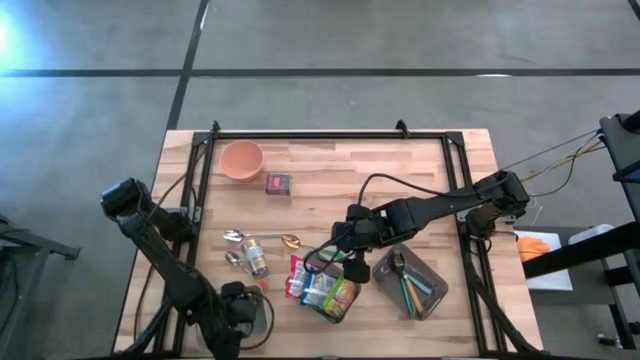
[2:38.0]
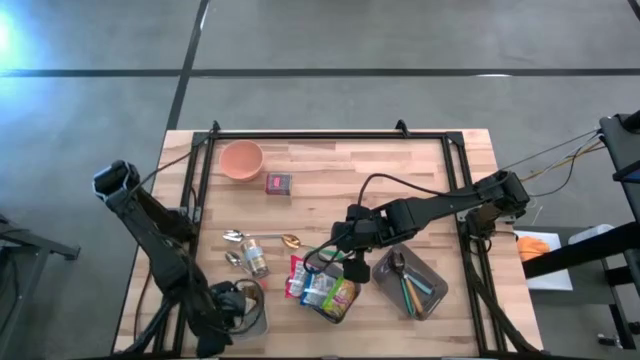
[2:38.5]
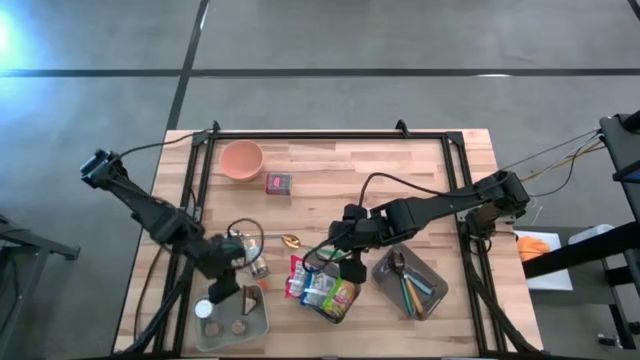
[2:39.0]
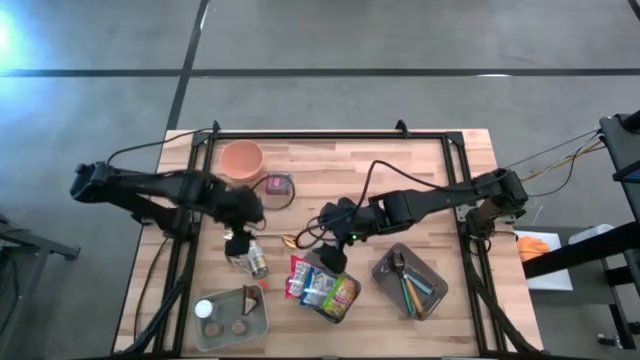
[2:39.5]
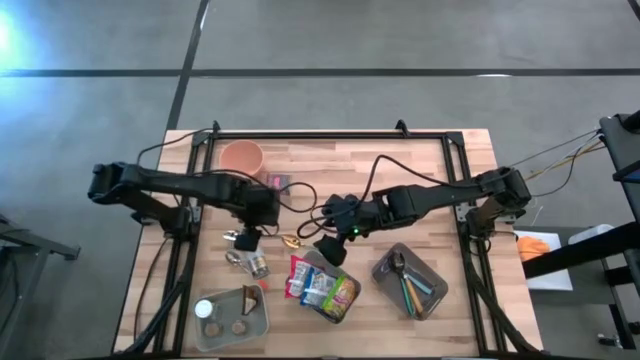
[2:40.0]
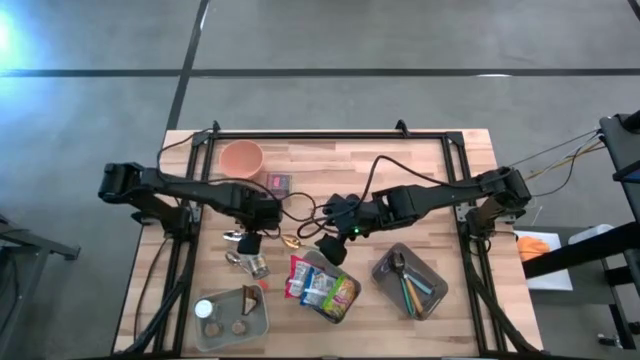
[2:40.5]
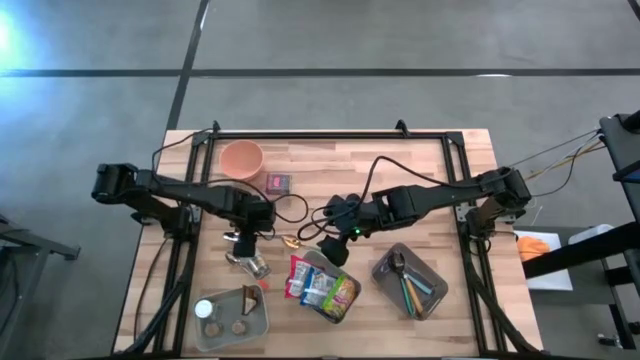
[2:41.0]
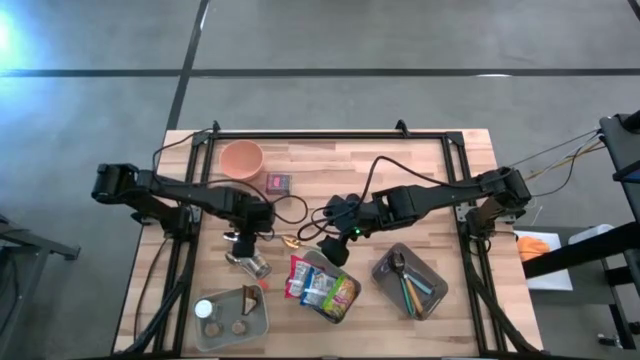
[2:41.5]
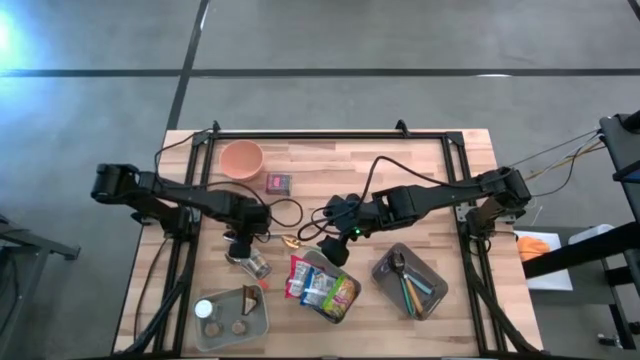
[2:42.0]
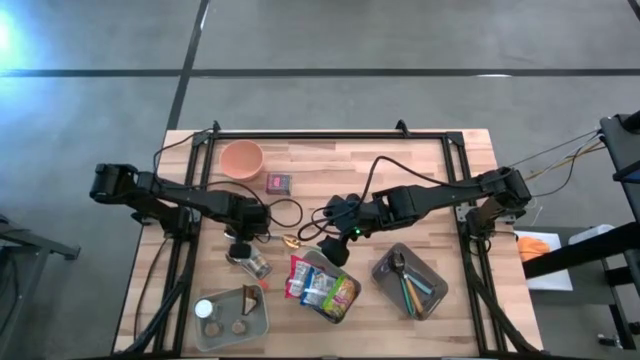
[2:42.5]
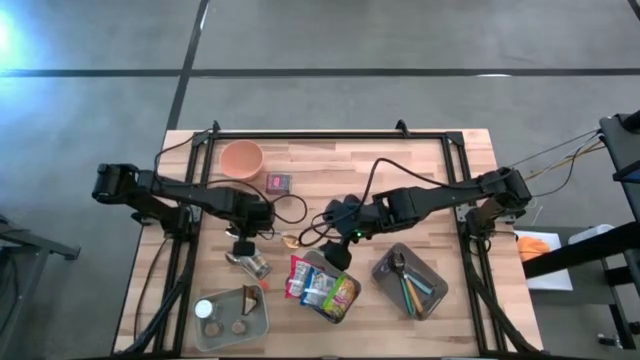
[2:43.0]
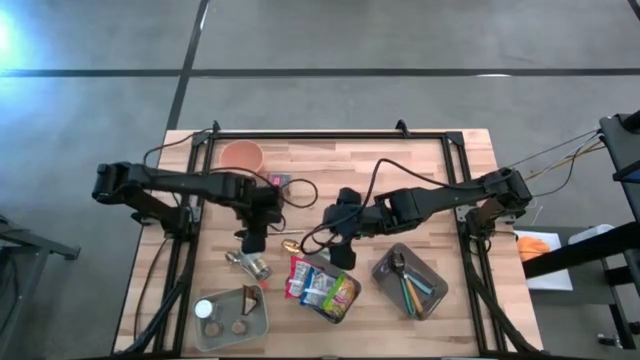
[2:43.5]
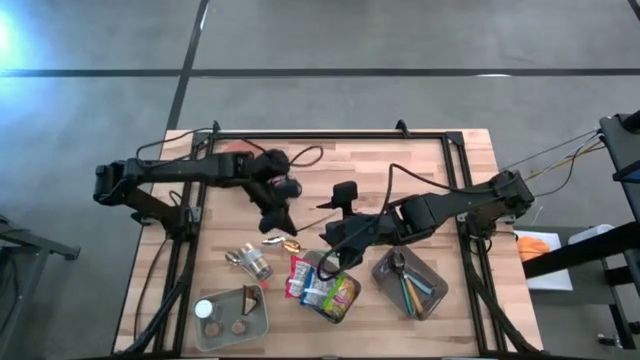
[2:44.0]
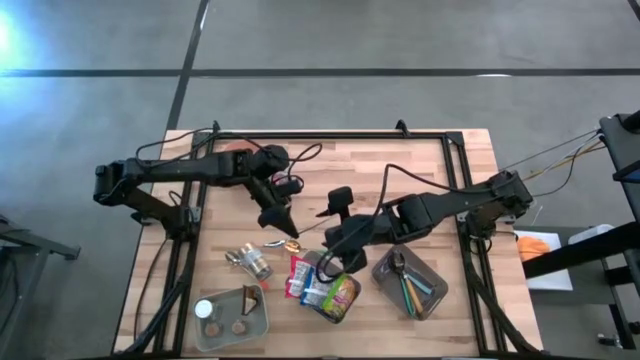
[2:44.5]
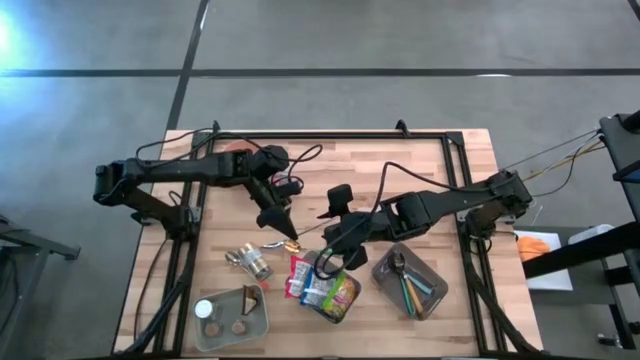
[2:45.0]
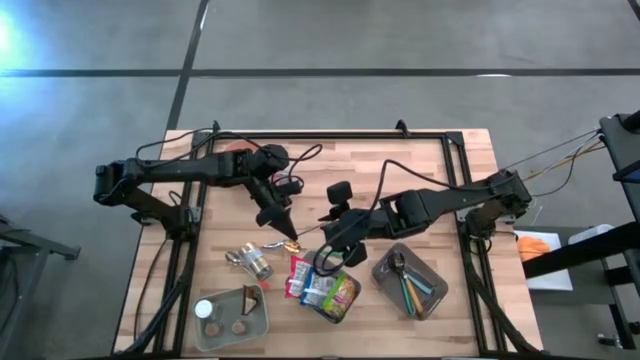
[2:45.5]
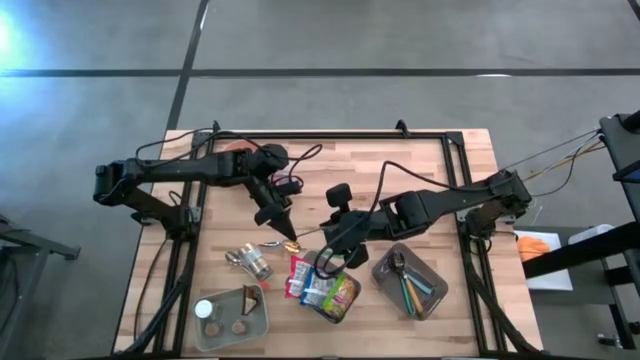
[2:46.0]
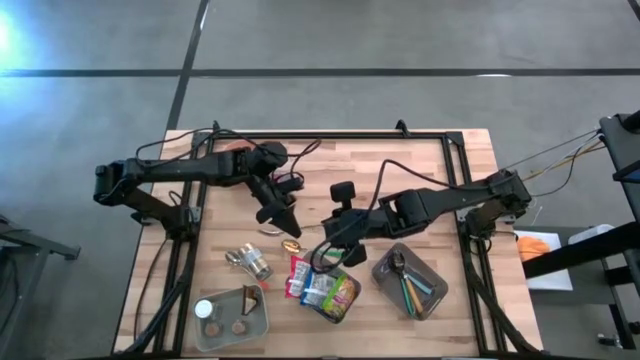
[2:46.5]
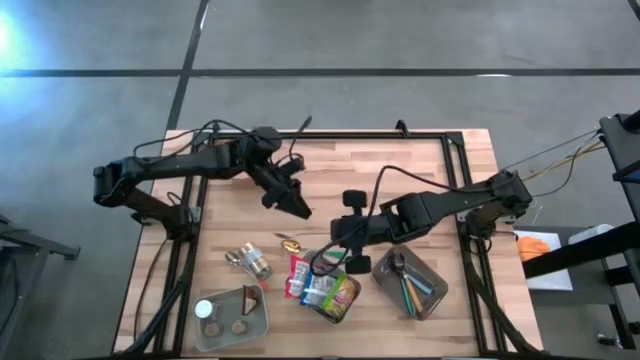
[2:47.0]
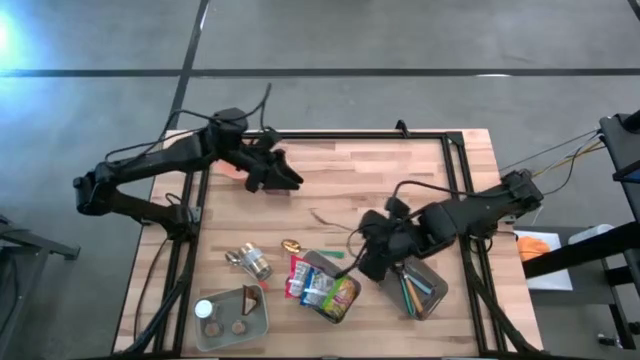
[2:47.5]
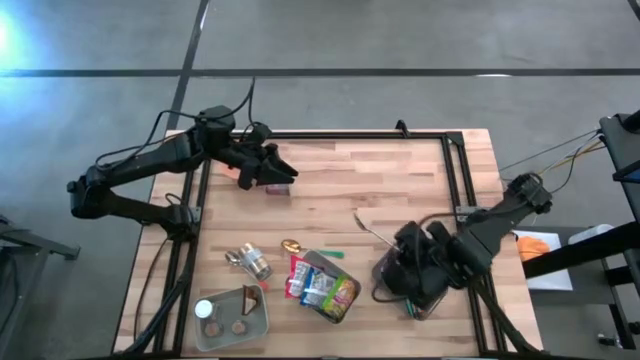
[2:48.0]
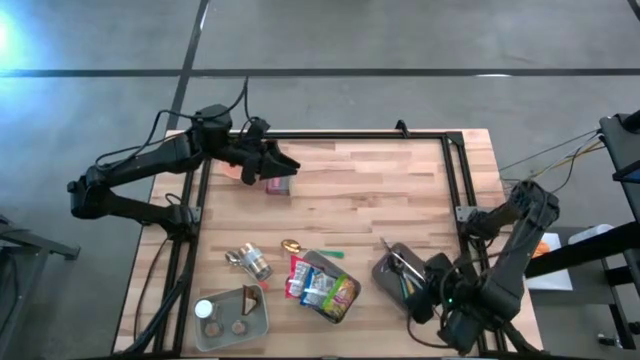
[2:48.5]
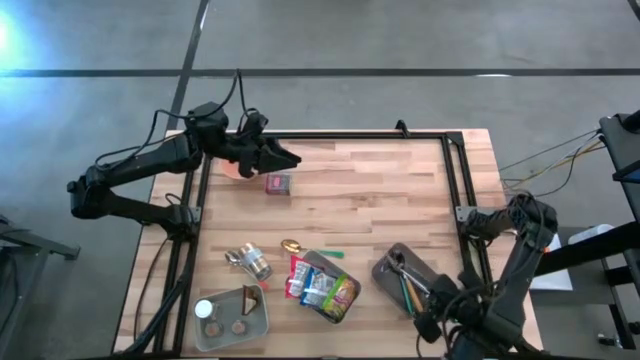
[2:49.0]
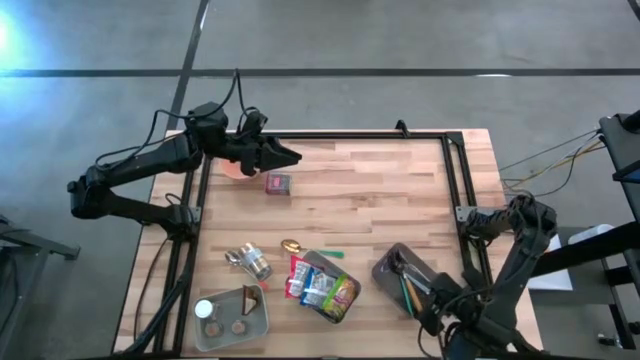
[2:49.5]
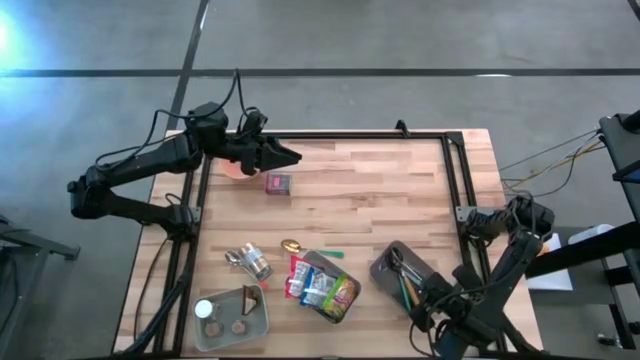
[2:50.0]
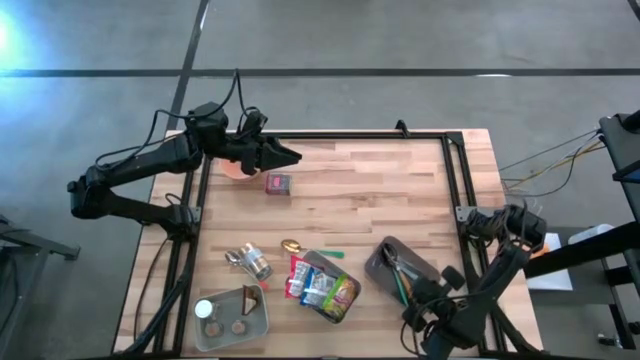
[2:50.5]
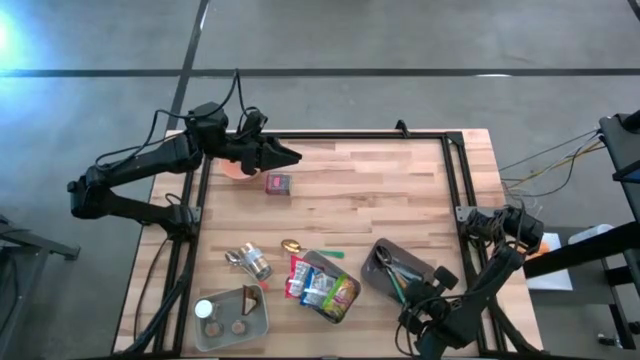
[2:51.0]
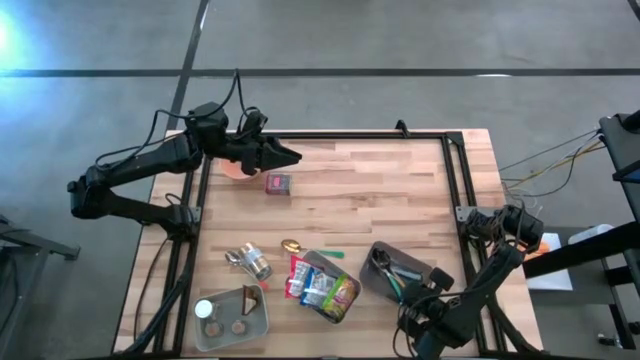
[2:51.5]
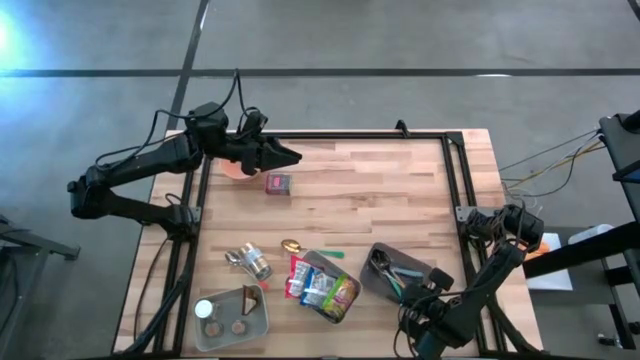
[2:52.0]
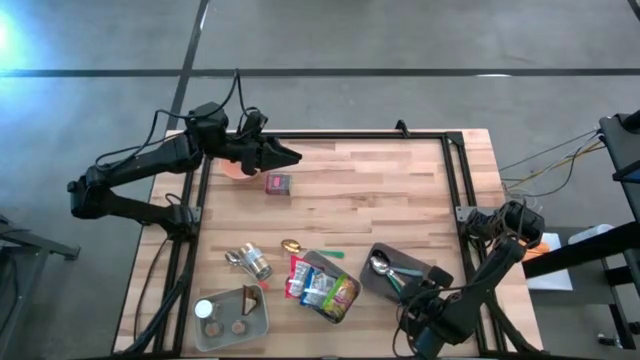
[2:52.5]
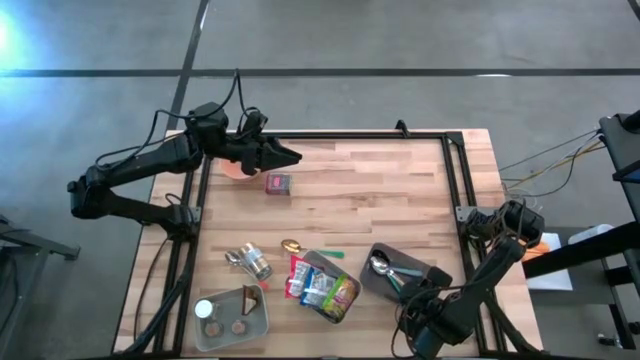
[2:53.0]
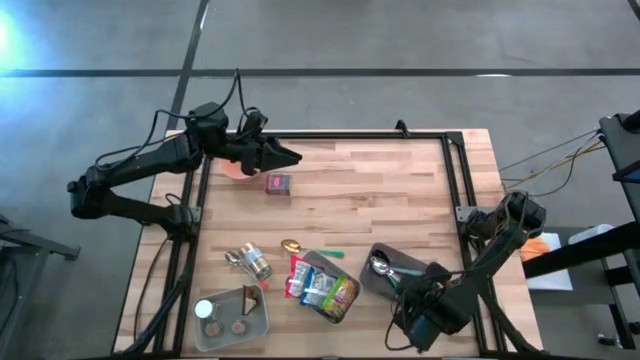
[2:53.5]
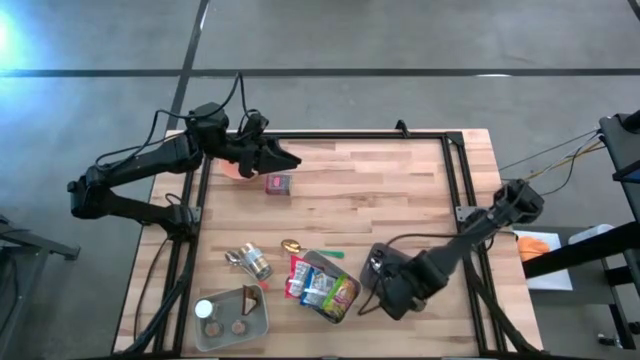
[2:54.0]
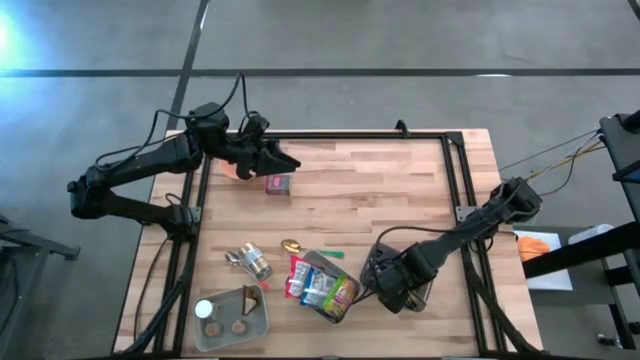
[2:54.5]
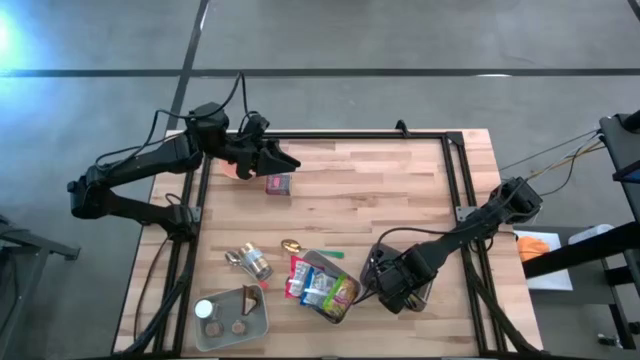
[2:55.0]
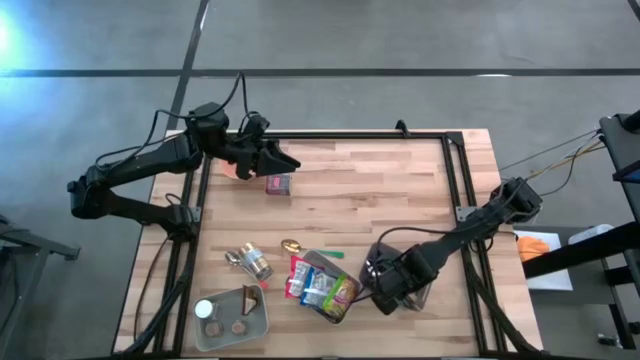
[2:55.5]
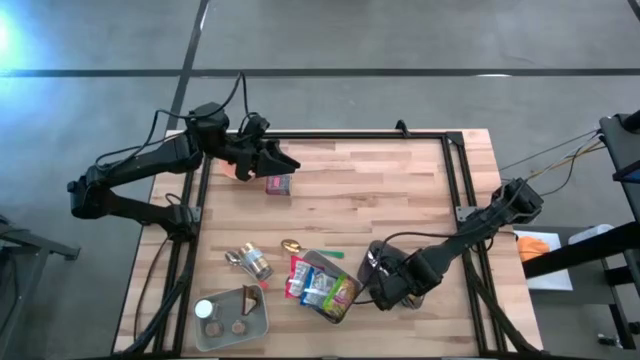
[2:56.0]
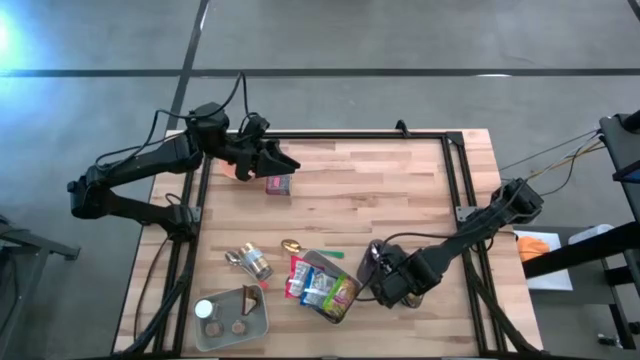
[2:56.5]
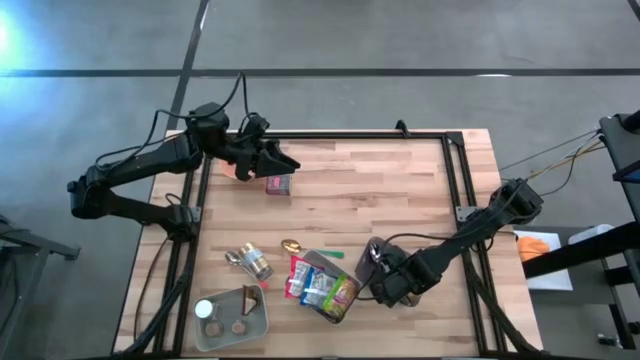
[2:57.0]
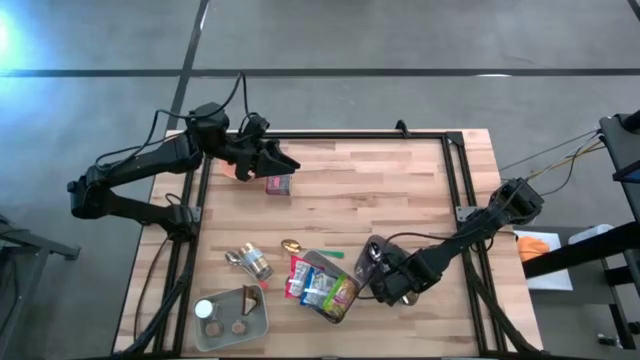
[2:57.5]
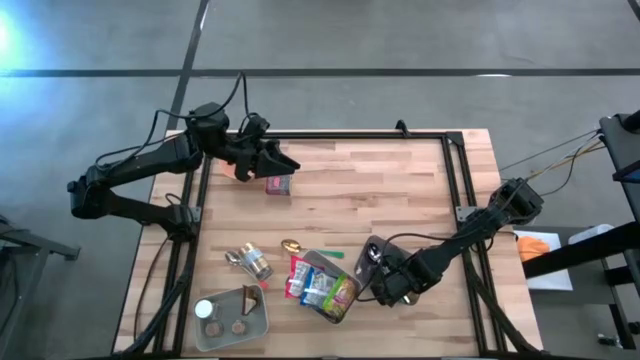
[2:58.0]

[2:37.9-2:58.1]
Put the silver spoon into the black bin
